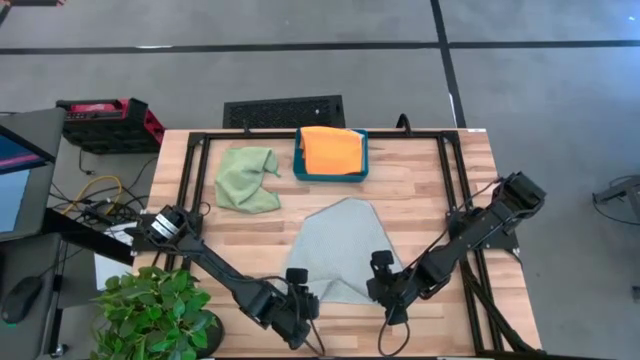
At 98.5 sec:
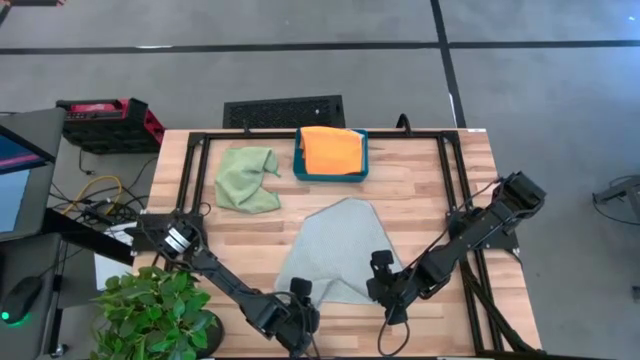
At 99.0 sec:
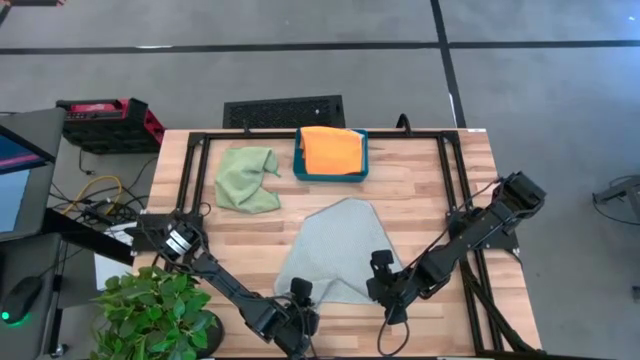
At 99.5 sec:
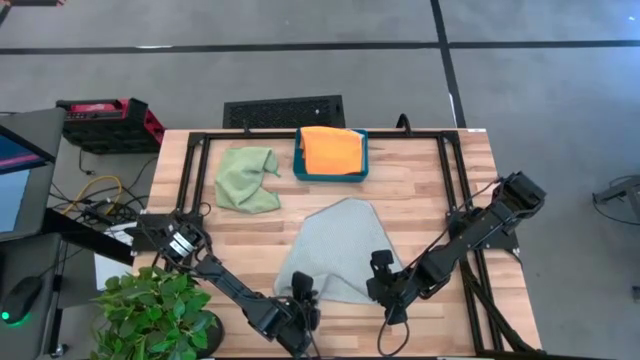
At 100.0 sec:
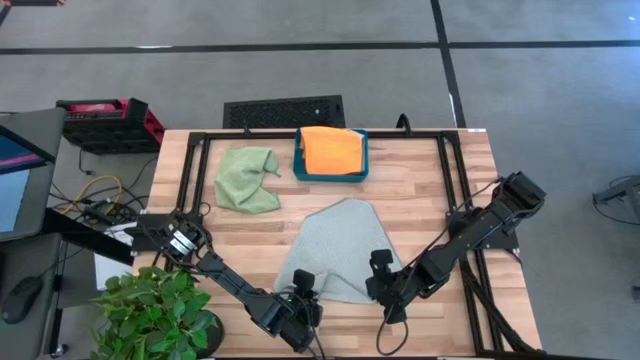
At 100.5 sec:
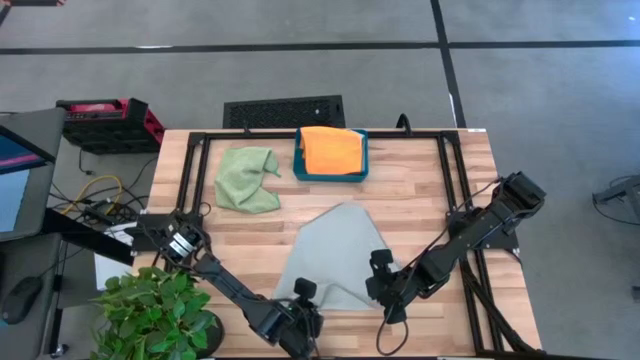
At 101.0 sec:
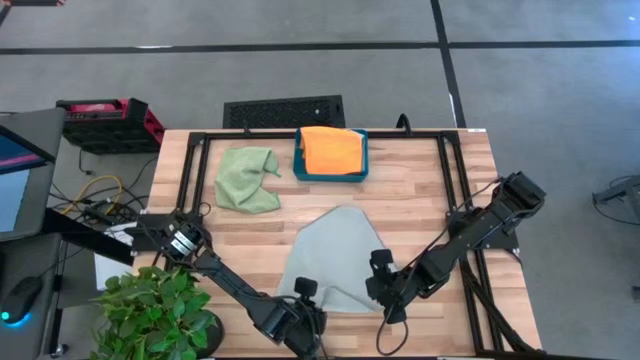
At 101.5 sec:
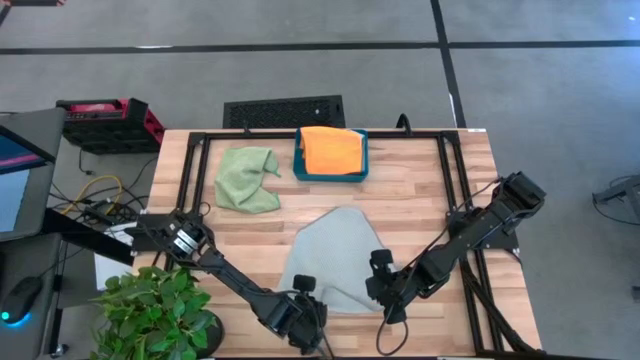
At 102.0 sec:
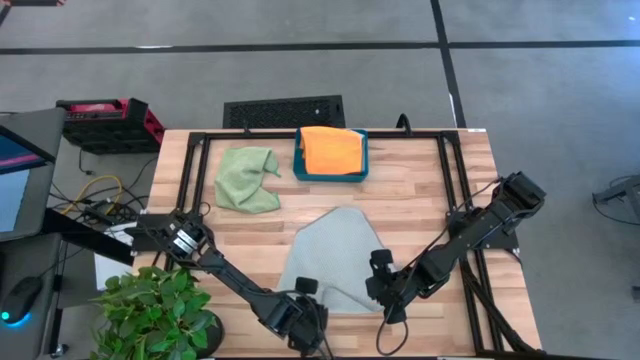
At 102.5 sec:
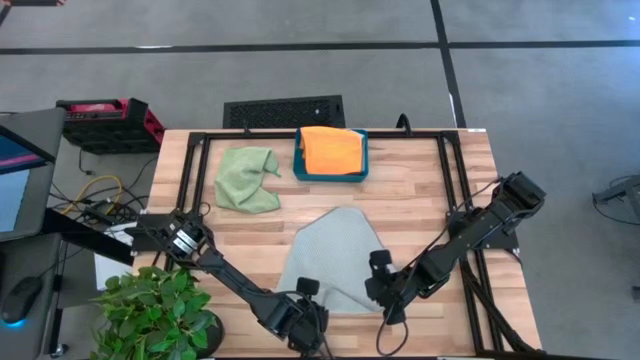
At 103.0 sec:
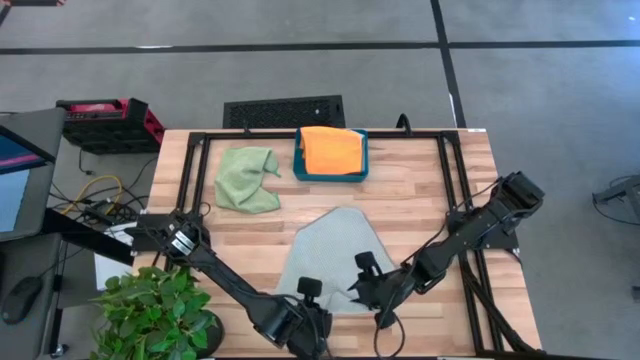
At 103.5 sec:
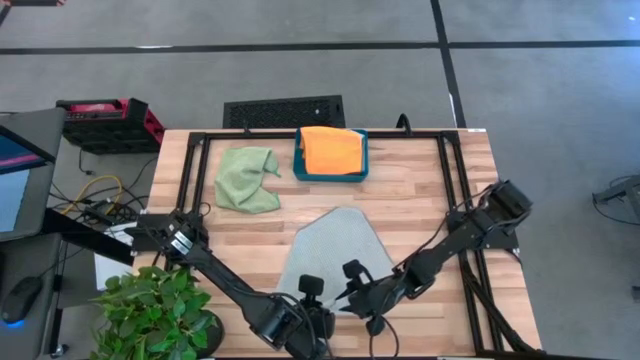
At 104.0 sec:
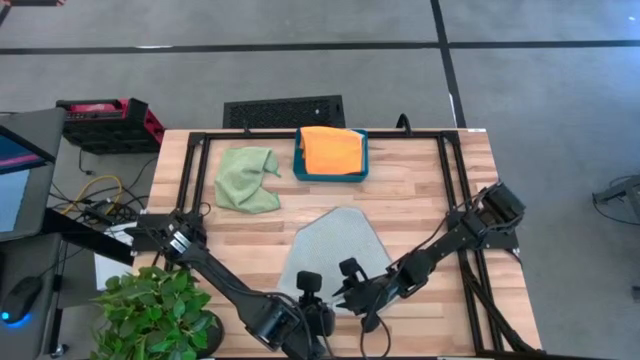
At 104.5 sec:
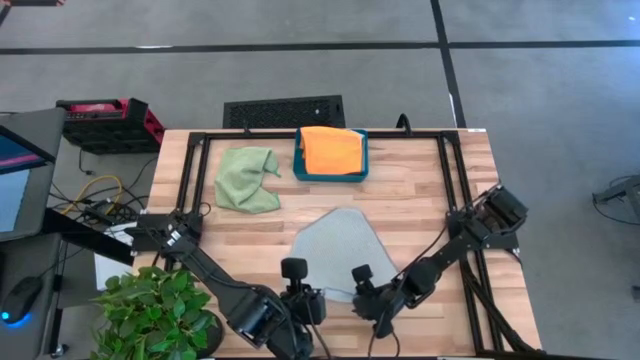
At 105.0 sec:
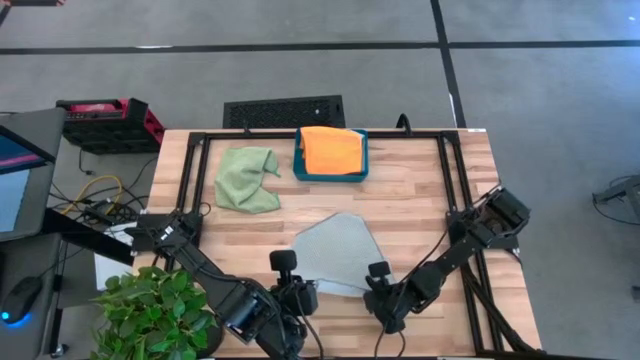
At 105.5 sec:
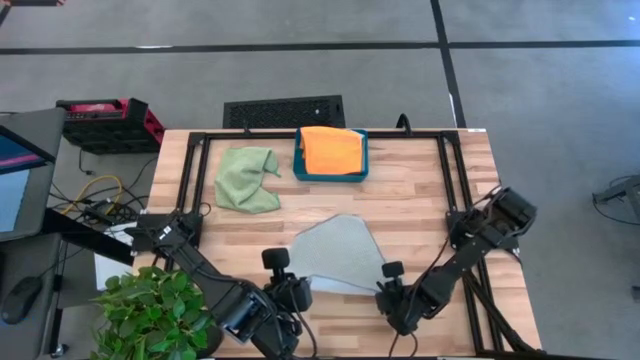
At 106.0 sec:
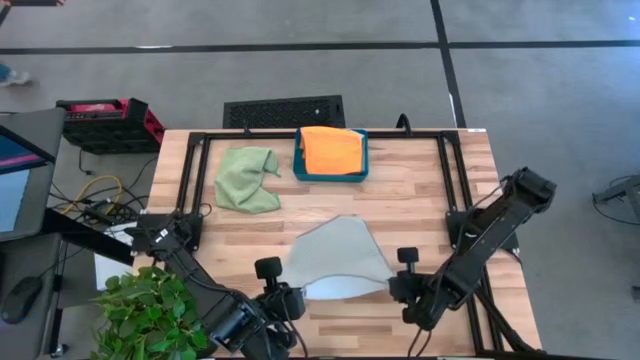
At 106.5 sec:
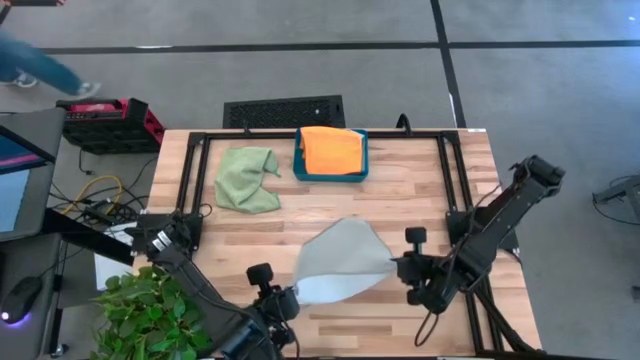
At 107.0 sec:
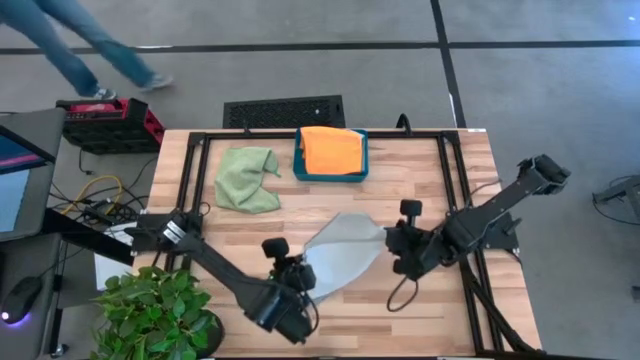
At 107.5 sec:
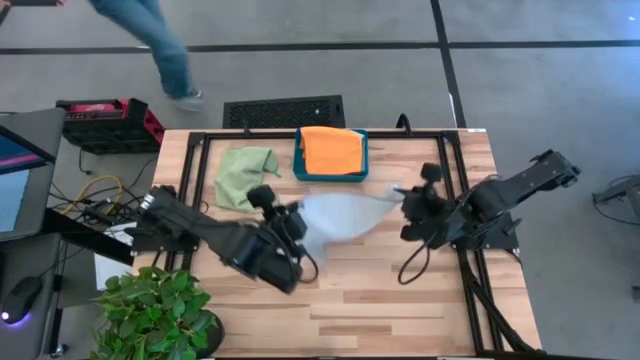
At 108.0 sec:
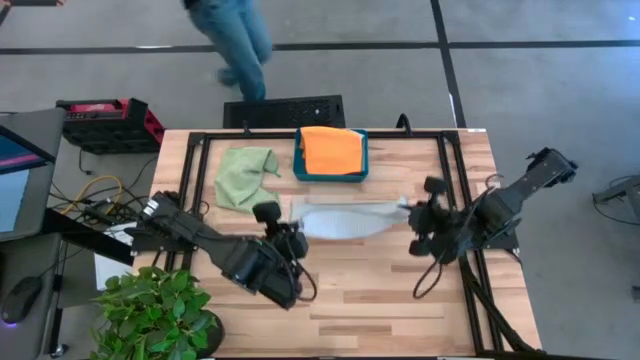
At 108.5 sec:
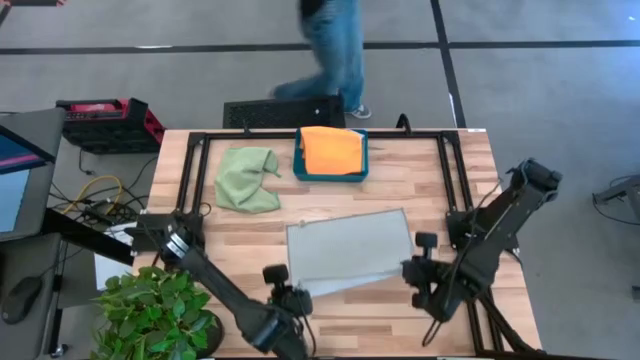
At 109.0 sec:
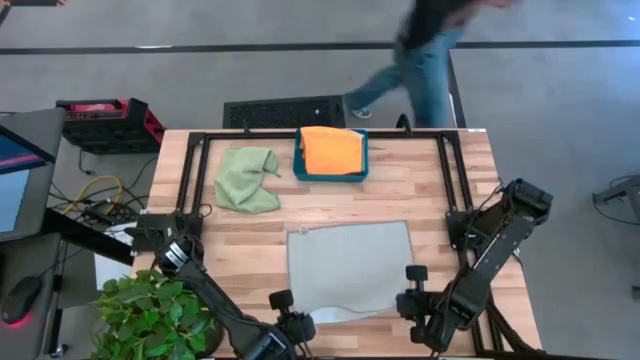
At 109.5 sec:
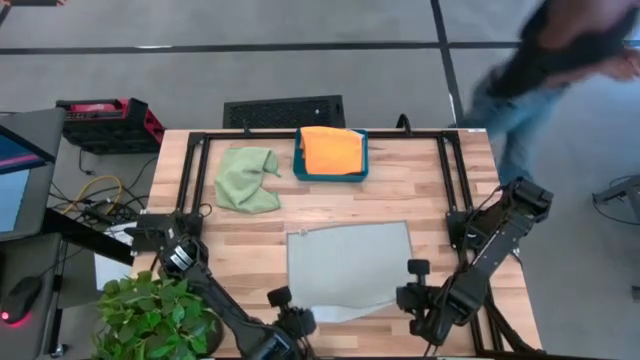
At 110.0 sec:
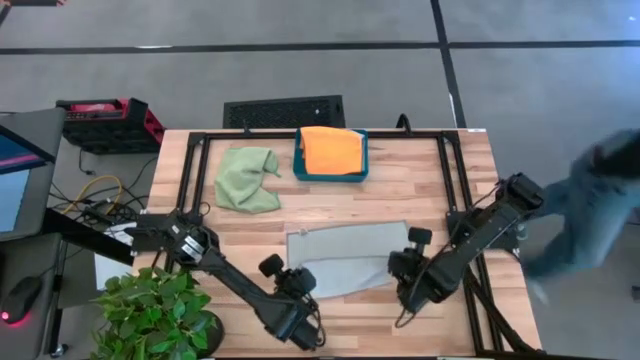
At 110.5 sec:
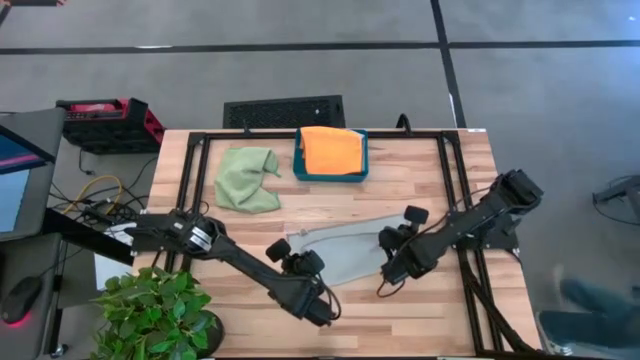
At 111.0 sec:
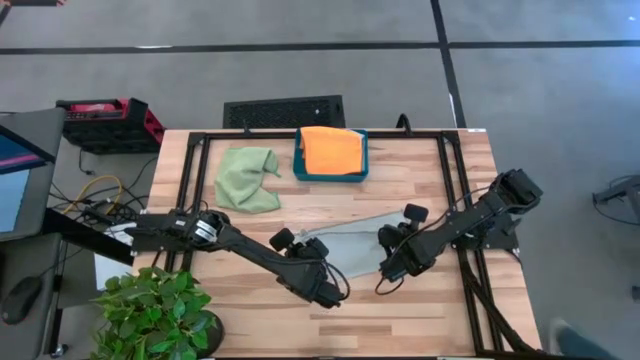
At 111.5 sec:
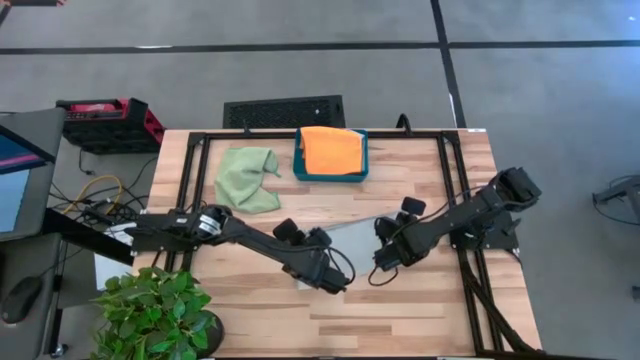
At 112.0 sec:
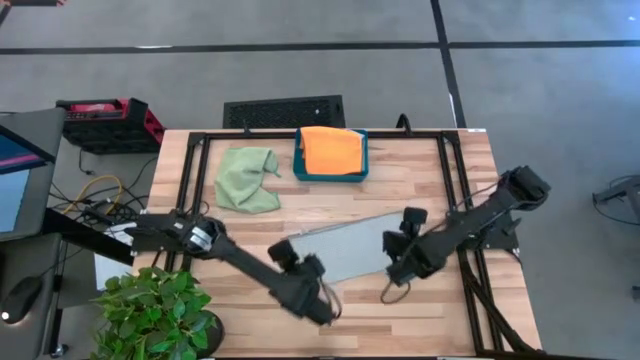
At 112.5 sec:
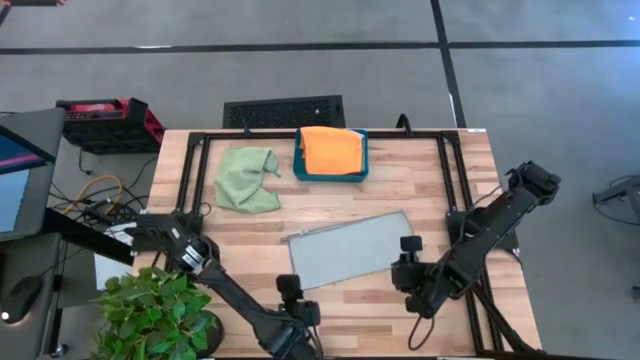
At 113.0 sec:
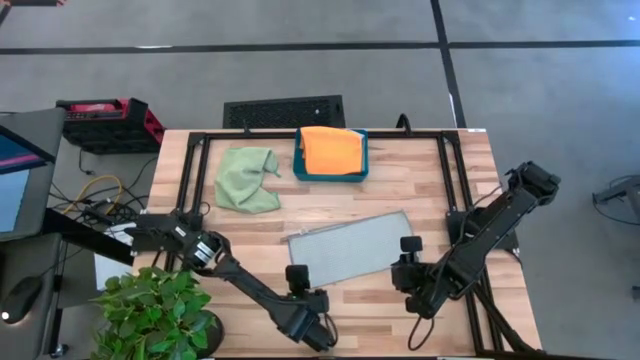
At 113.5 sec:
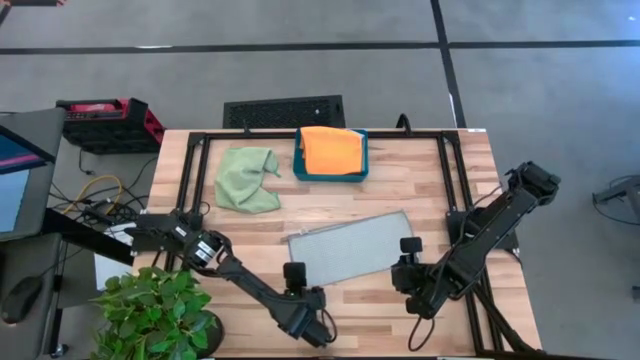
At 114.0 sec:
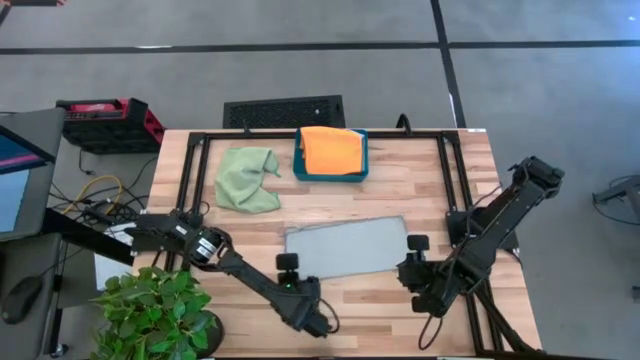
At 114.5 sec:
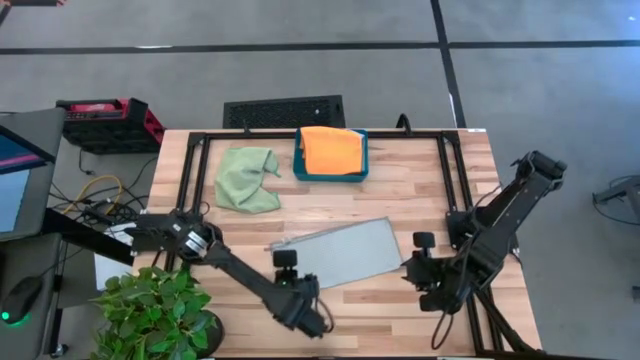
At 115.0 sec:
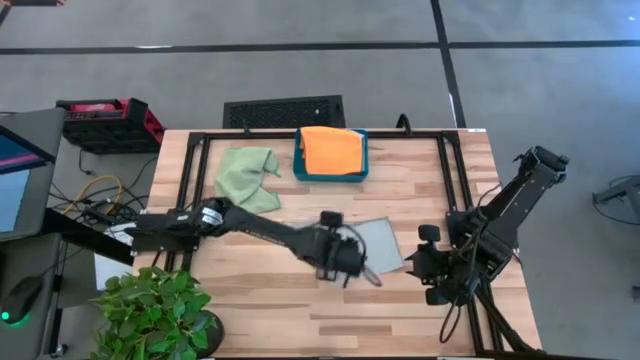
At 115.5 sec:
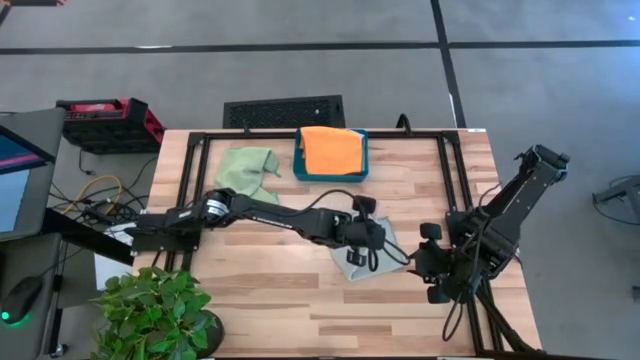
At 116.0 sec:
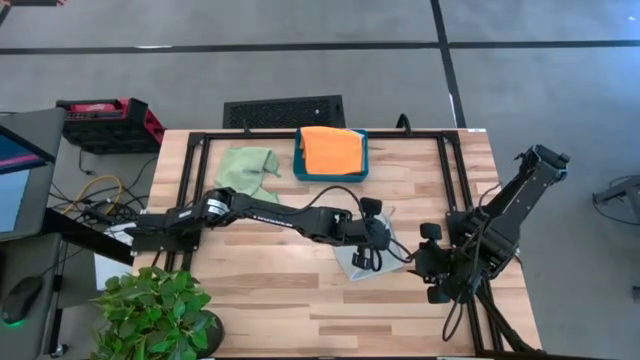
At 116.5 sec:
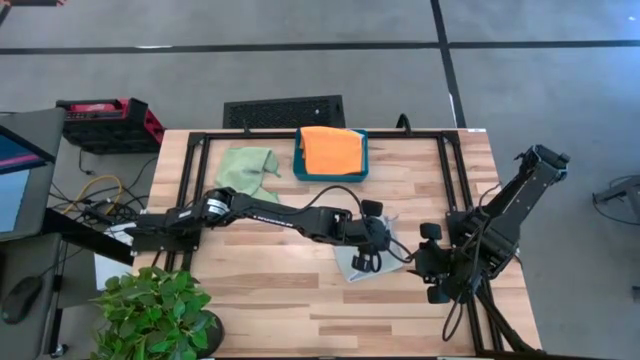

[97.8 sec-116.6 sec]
Task: Fold microfiber towels
Fold the gray towel

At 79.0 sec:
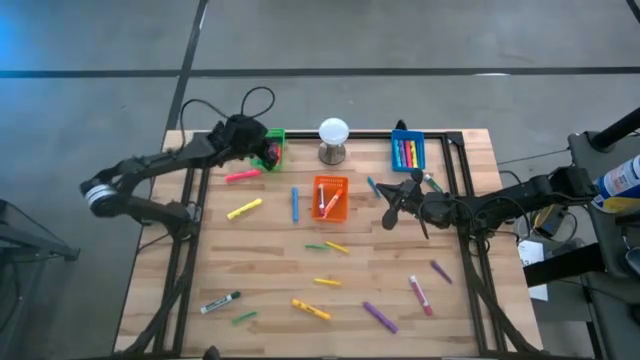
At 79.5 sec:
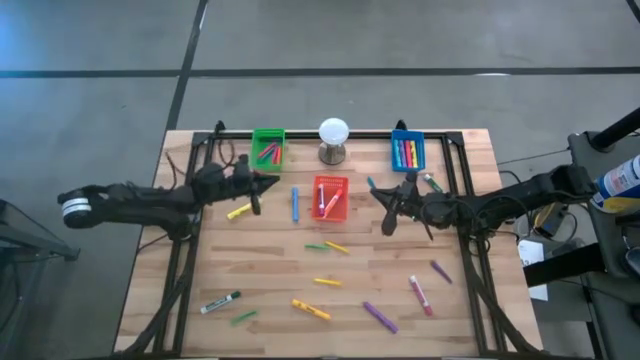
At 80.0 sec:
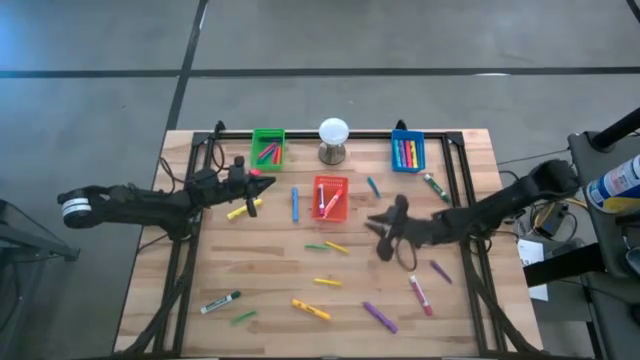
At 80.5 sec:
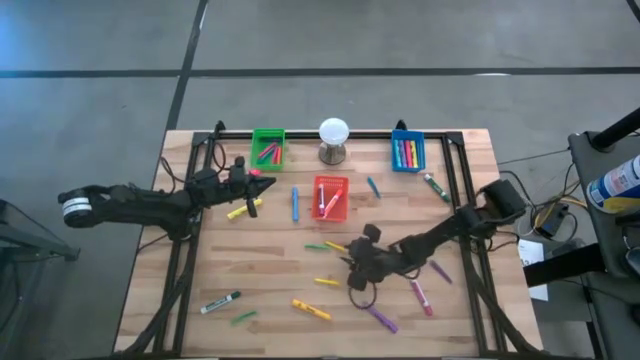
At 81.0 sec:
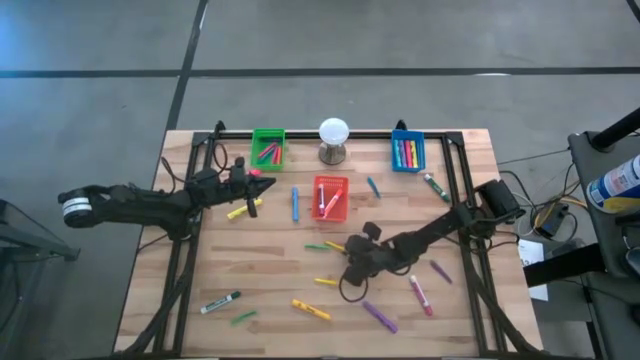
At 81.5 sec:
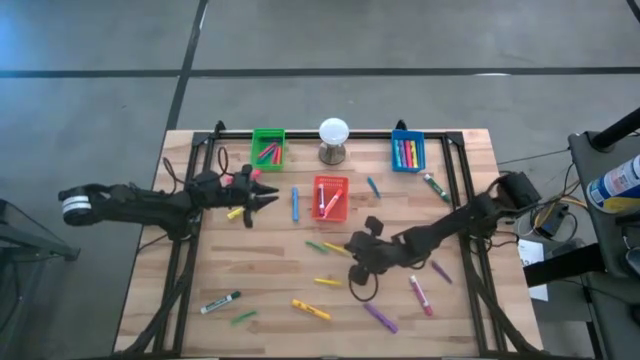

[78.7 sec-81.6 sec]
Task: Pick & Place Markers
Put the top yellow pen into the green bin
